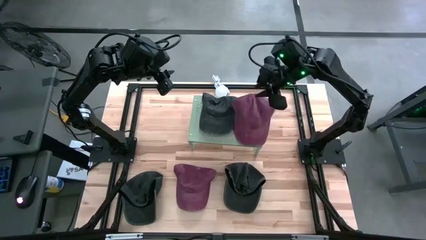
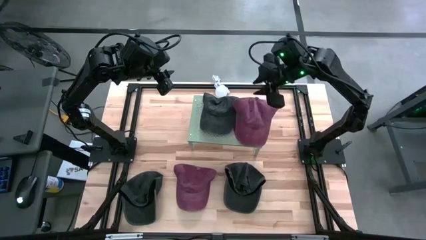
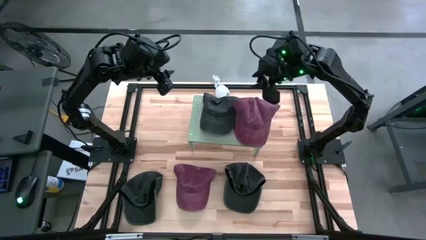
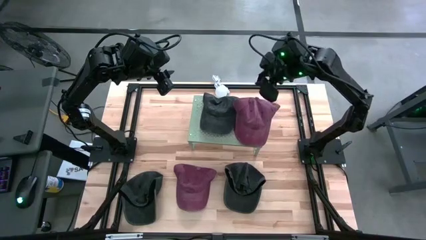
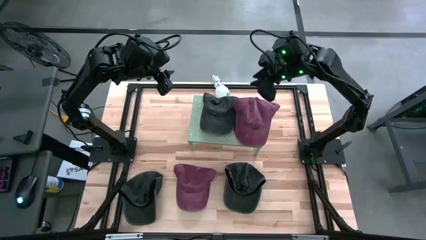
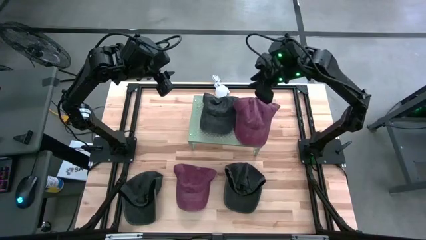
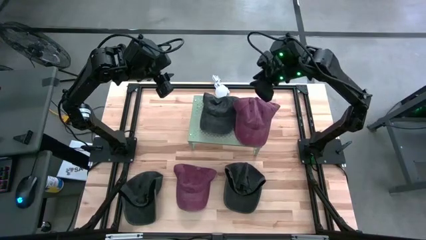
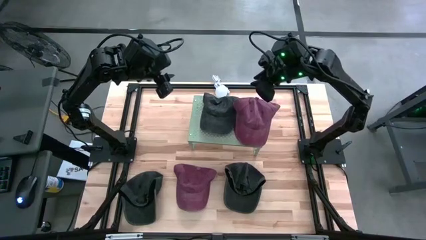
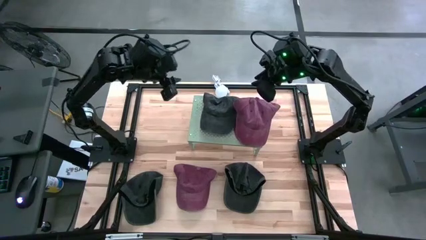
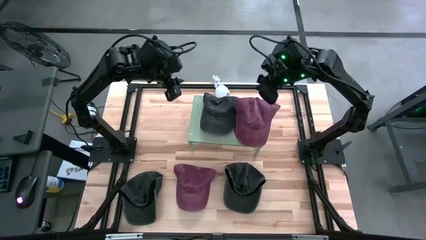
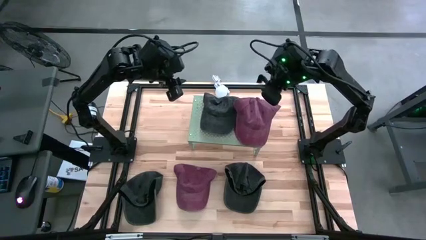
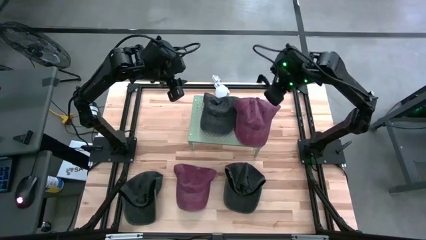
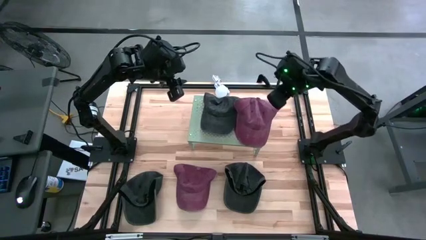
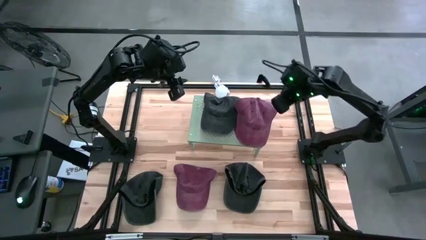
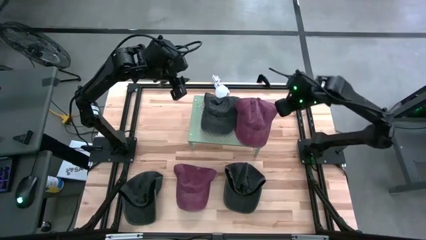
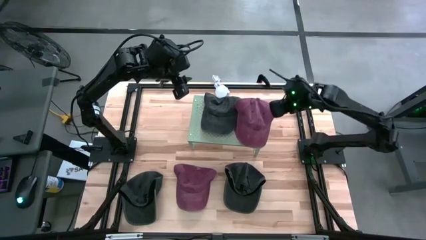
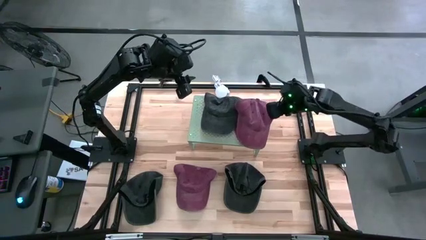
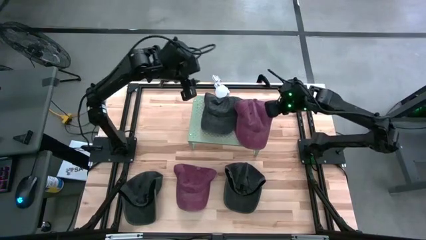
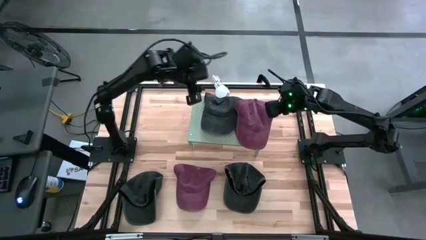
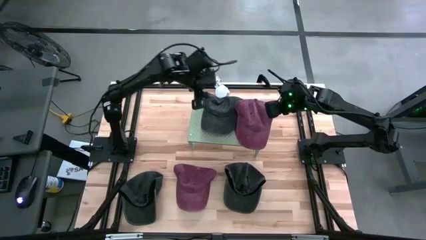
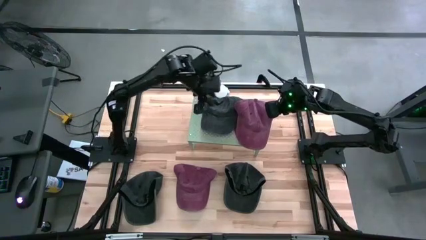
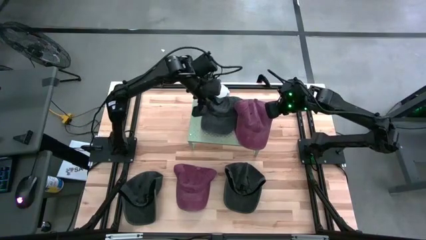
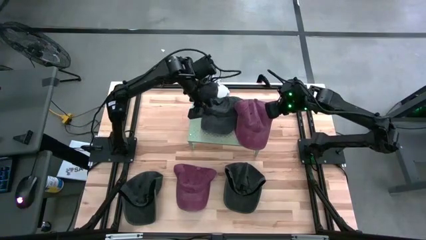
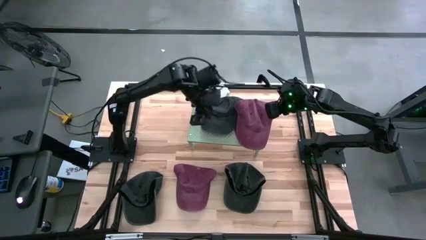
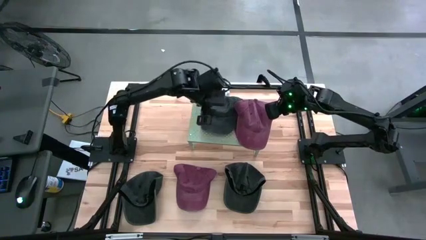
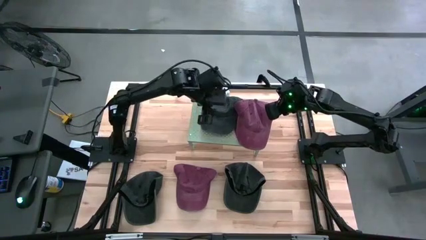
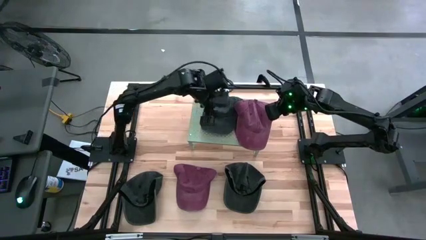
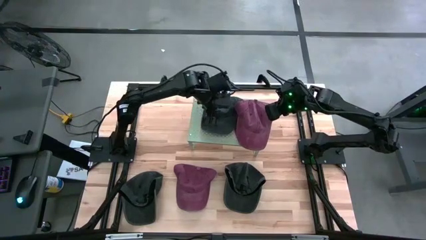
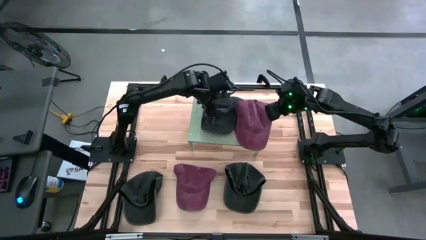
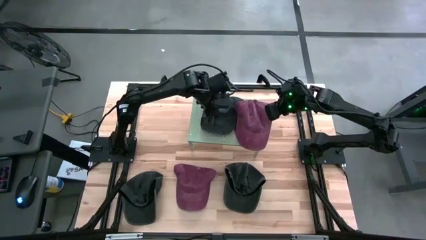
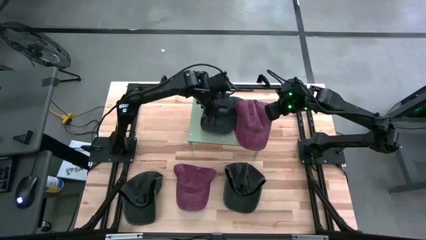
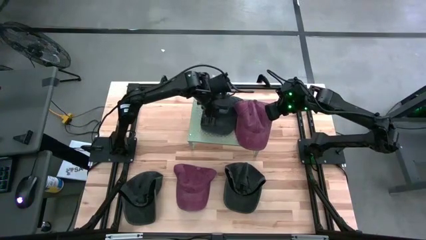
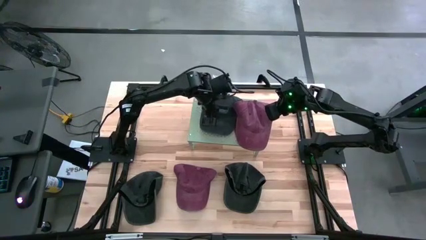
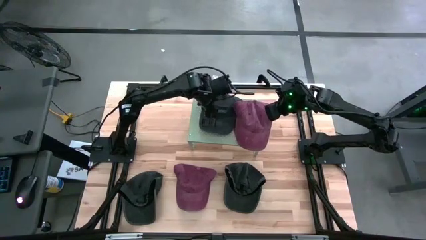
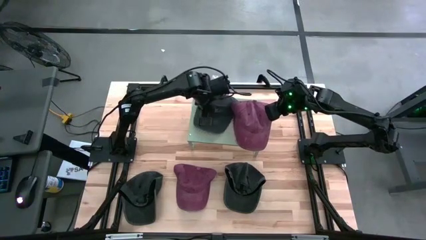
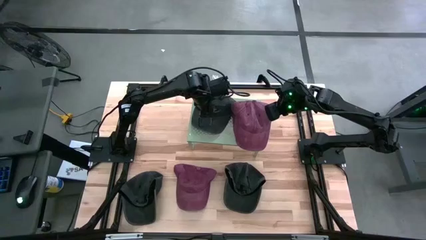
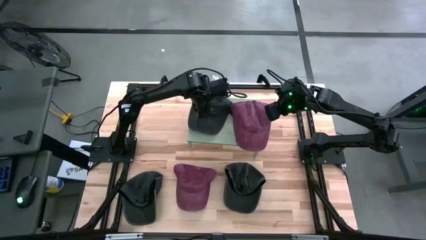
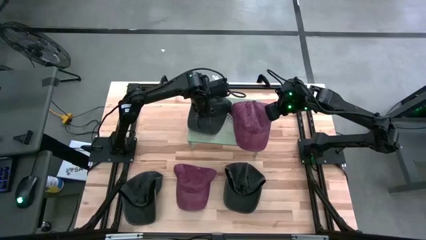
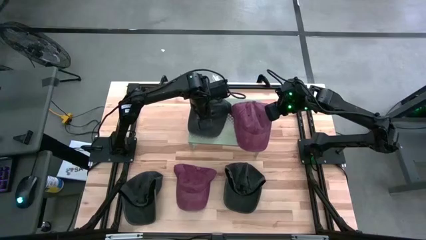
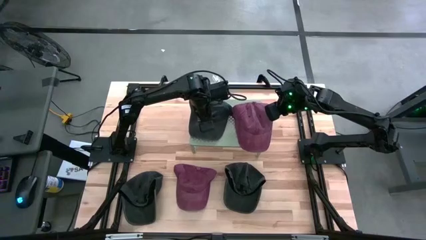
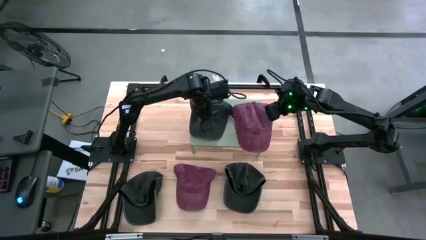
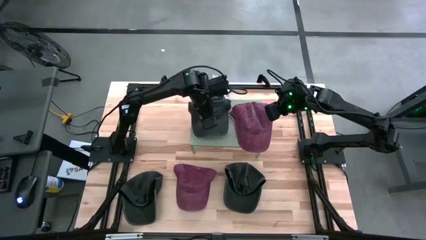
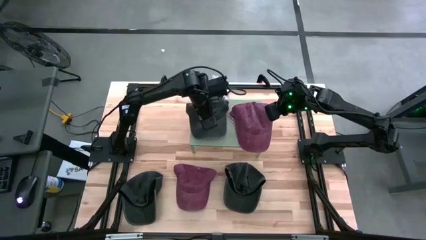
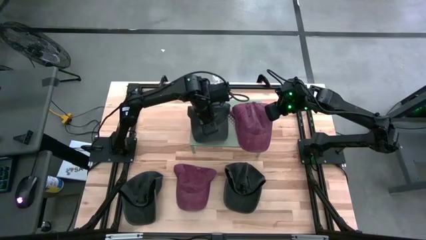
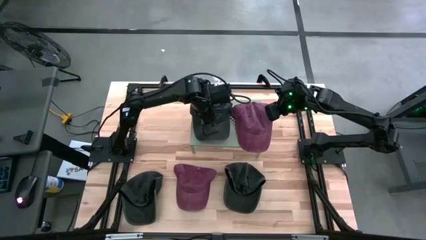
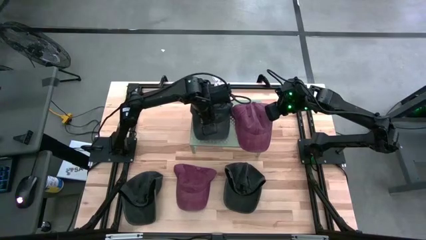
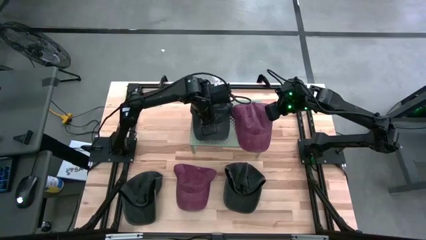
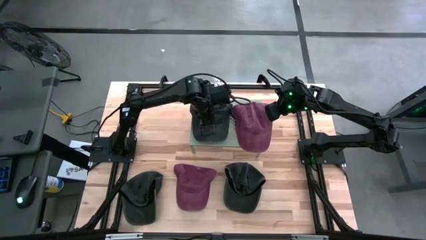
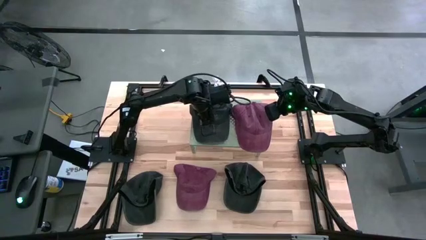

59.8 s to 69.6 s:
Task: Pick & Place hat
Adjust the black cap on the shelf

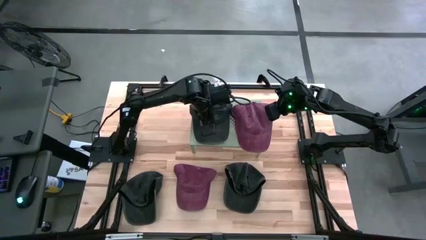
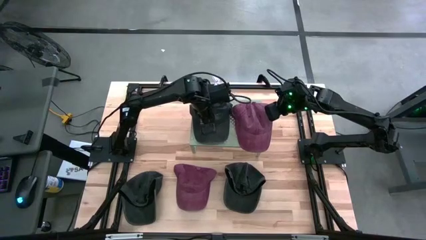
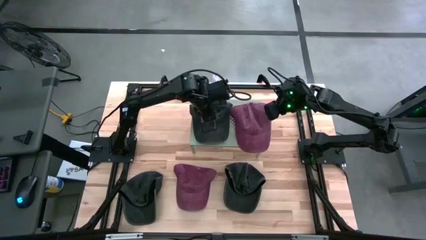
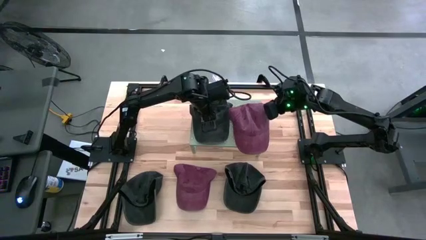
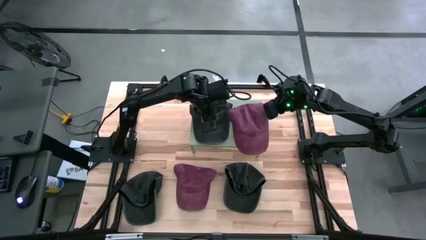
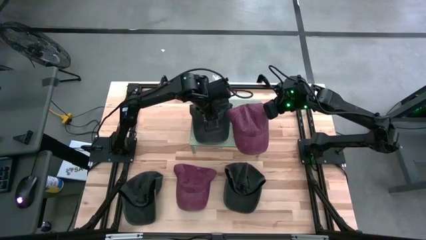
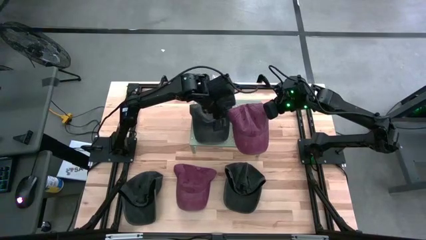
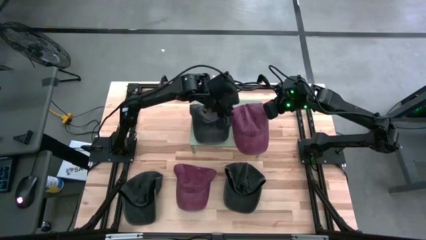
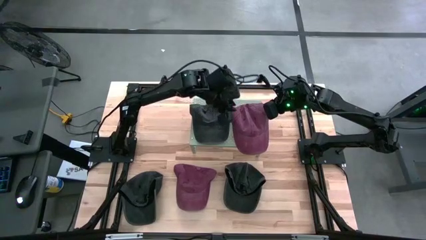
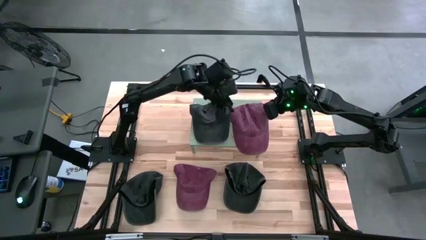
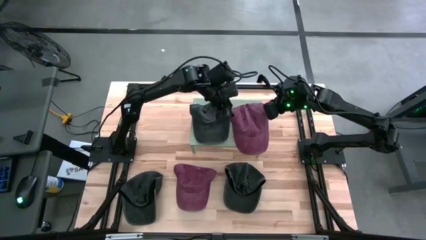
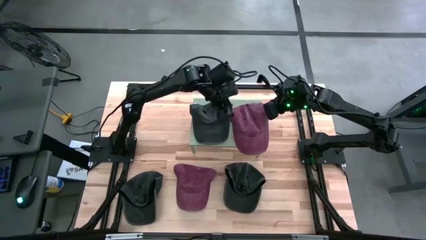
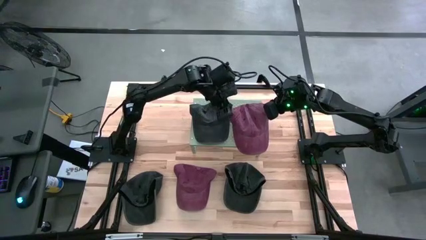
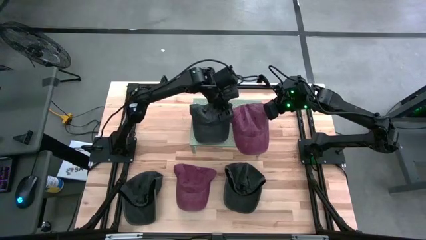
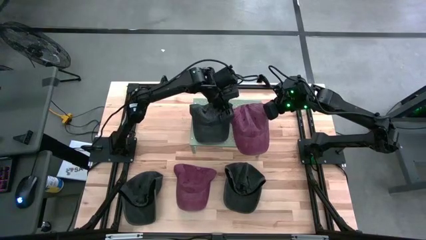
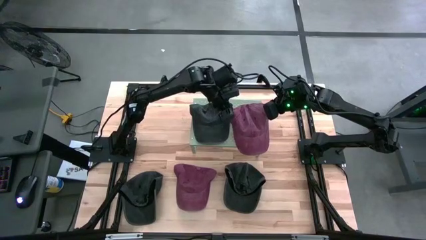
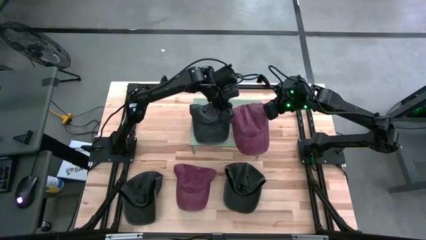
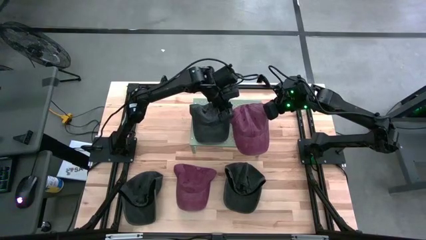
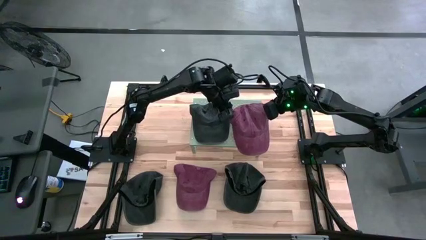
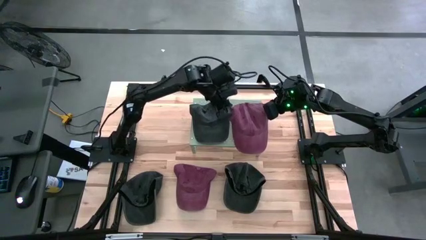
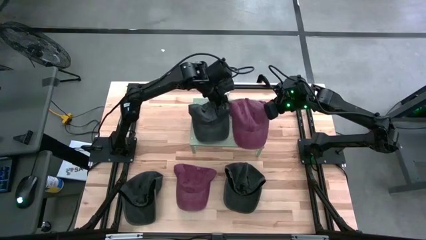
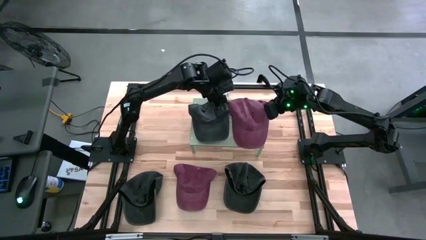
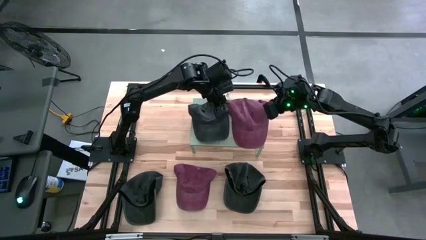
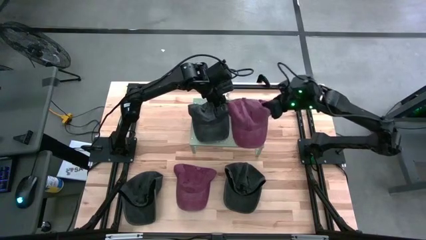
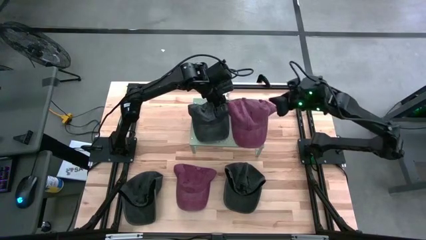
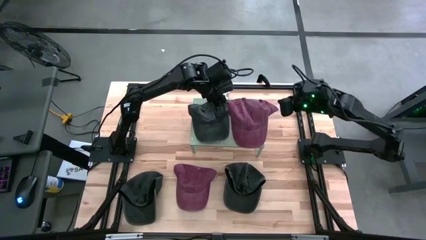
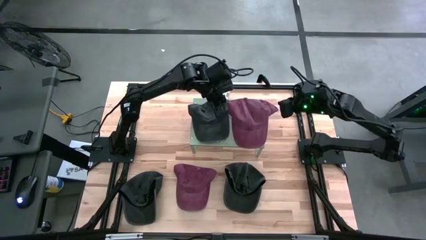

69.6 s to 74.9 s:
Adjust the stacked red cap on the shelf

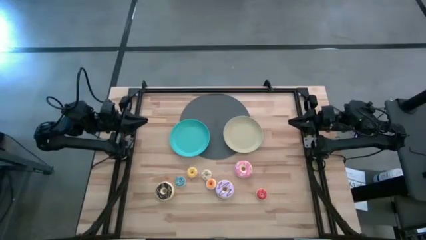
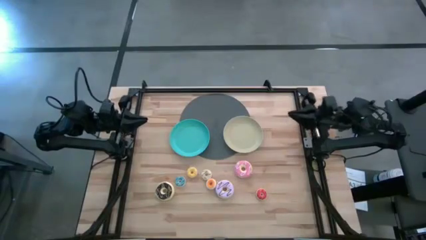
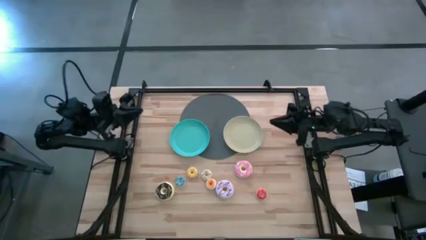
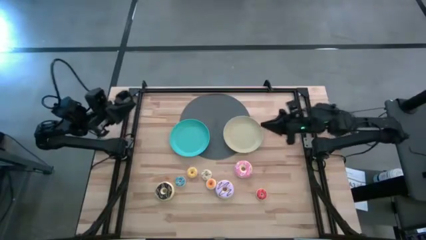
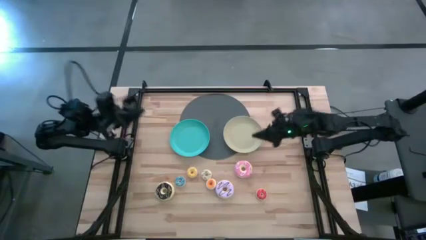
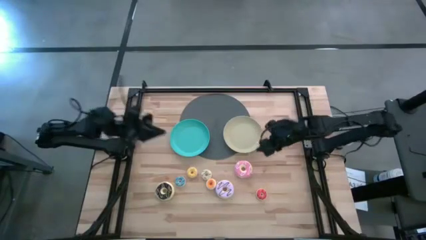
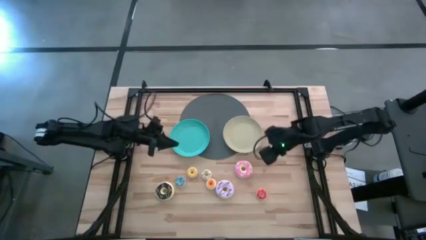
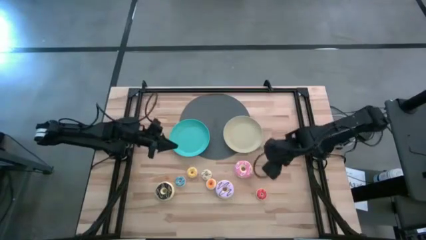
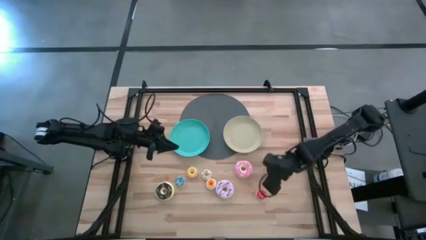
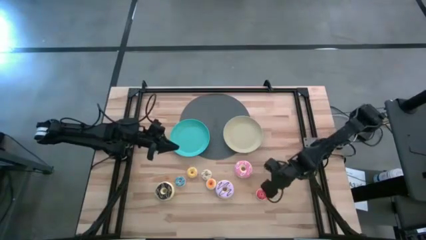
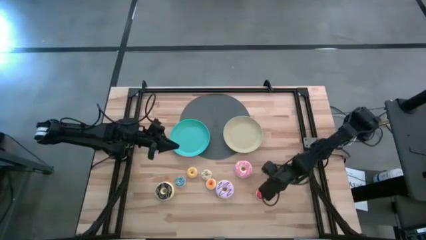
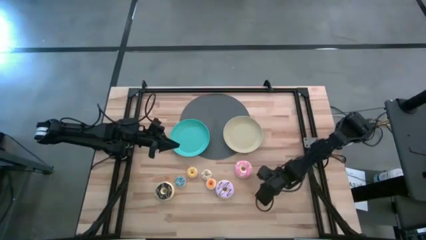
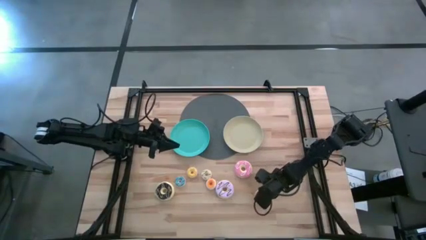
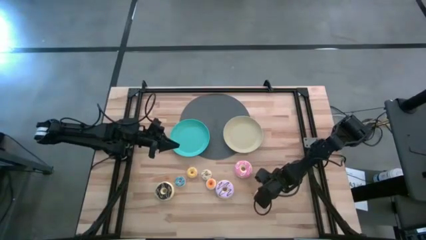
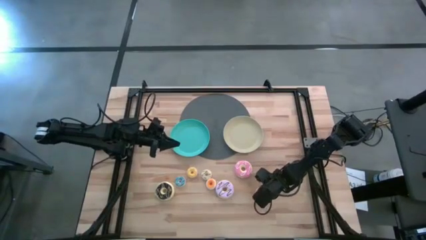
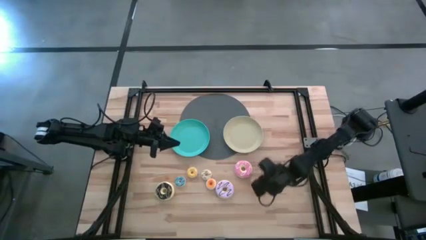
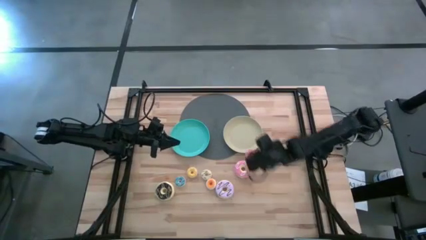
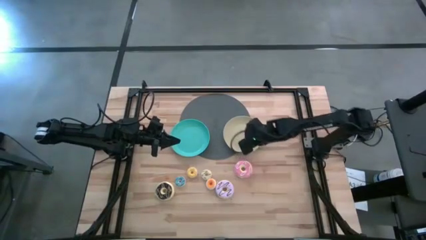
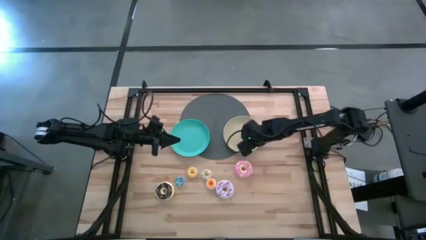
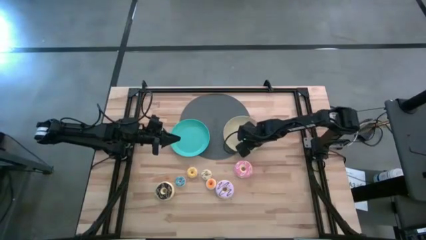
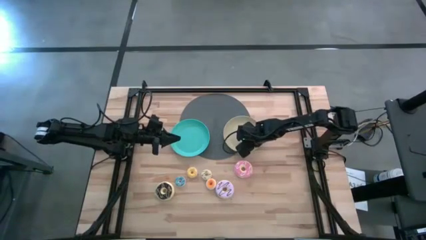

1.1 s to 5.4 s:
Task: Pick & Place donuts
Put the small red donut on the light gray plate
